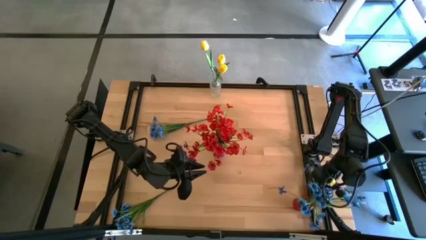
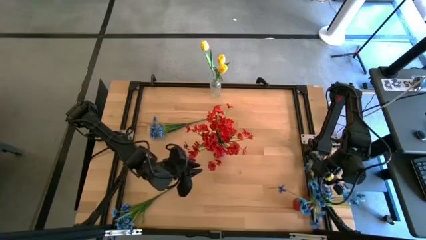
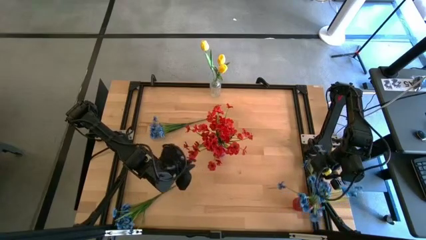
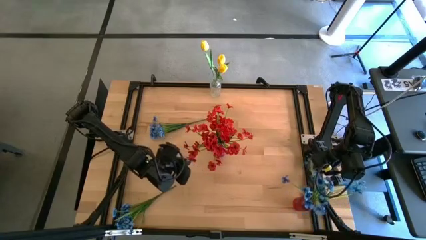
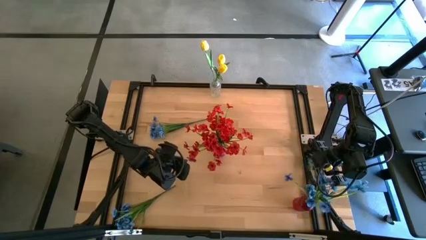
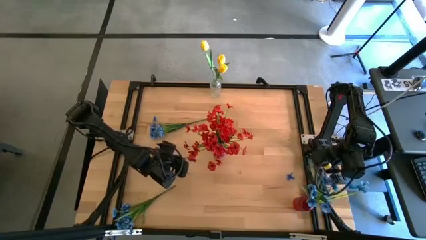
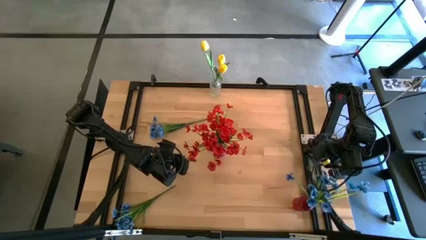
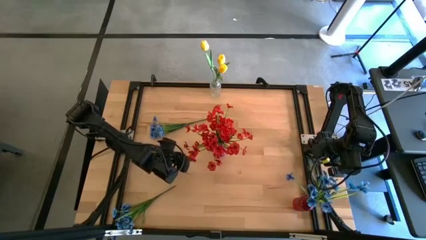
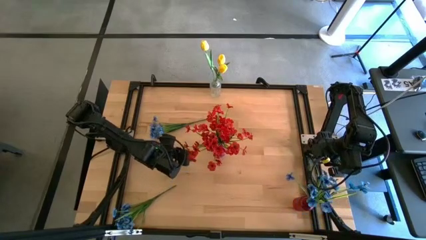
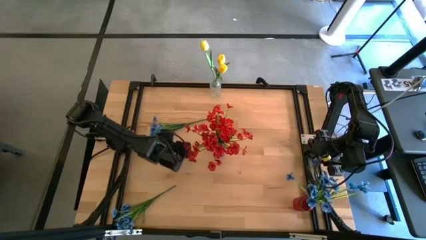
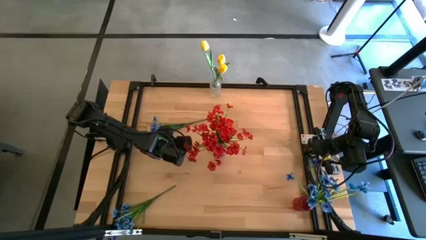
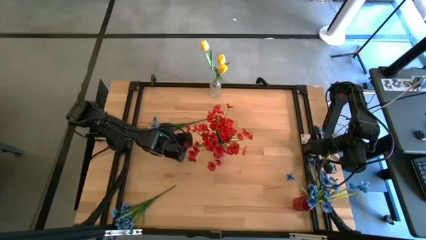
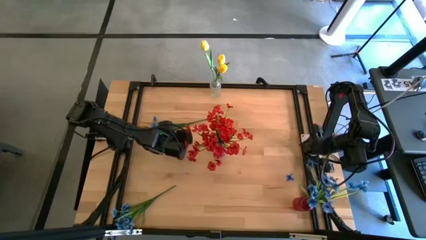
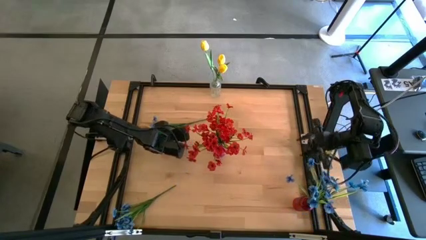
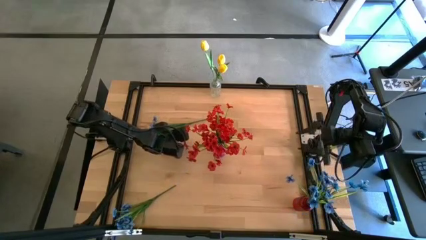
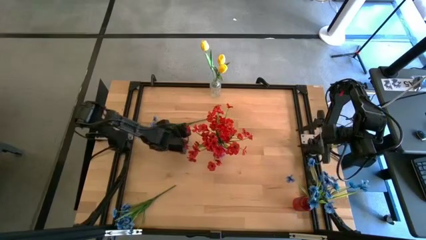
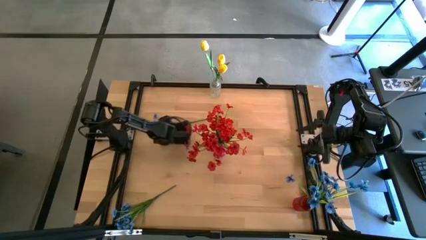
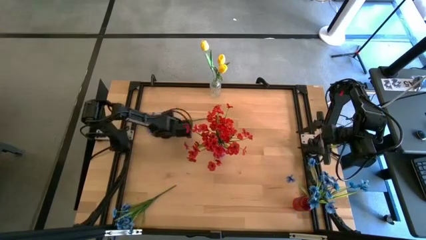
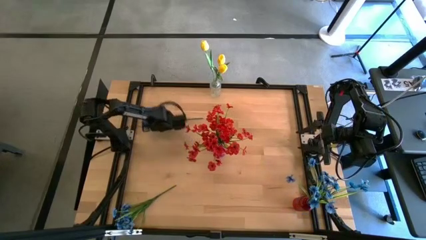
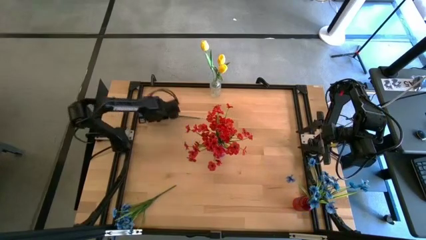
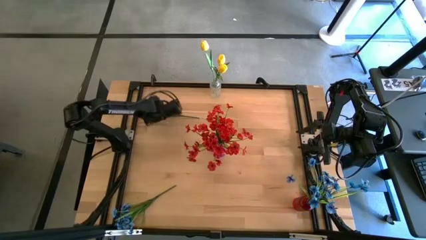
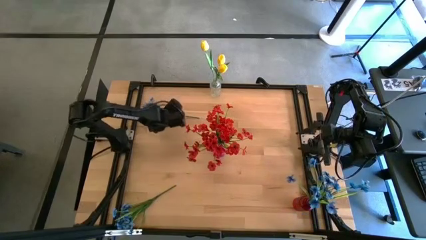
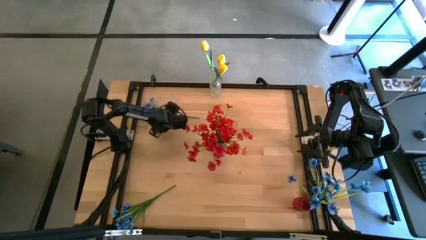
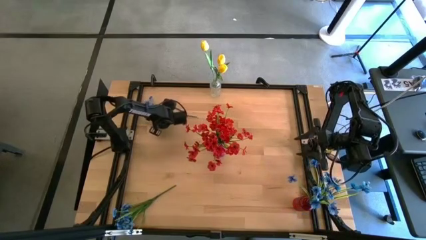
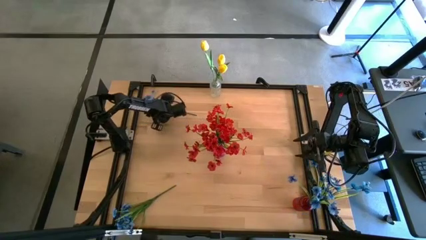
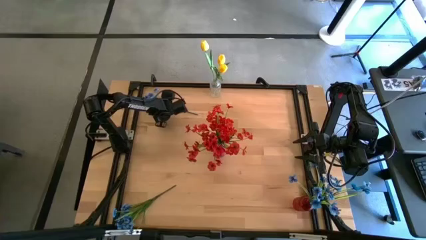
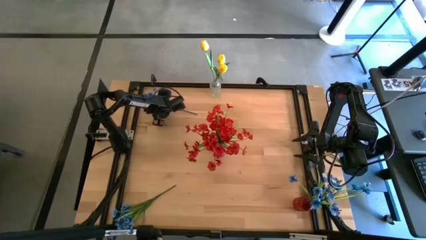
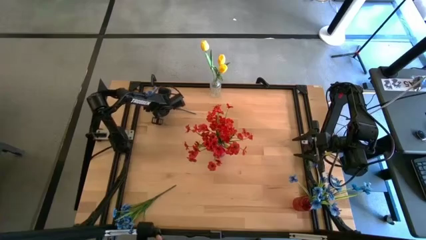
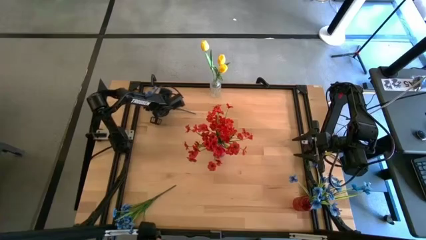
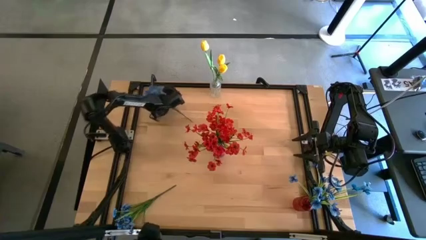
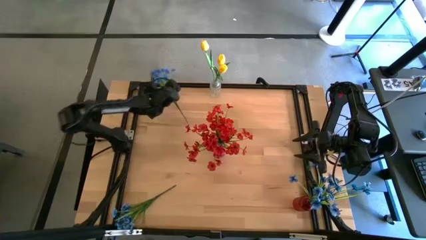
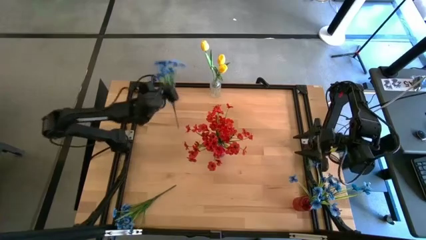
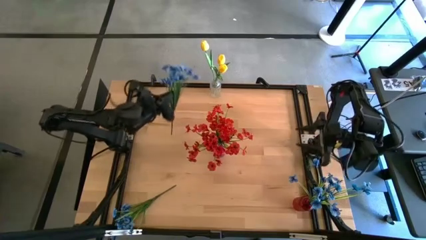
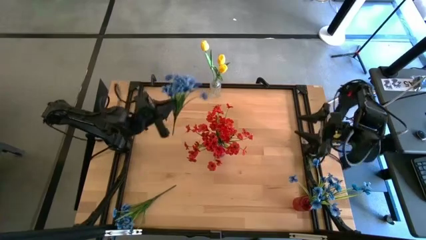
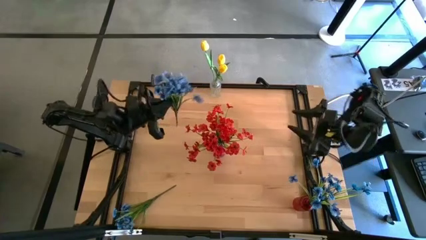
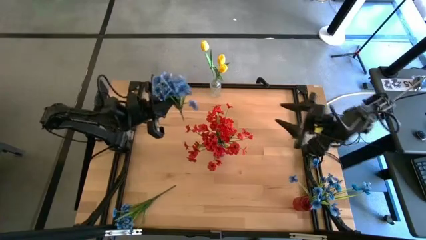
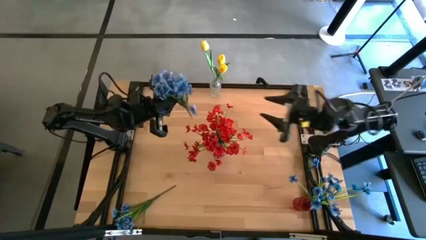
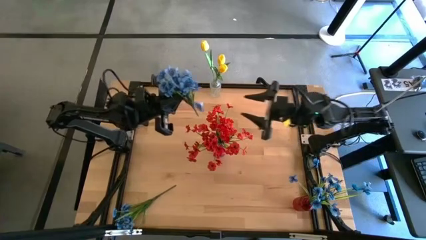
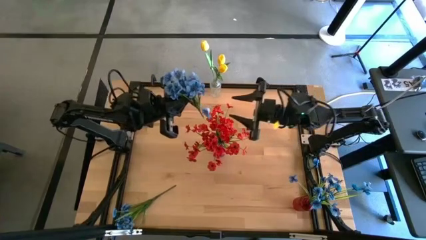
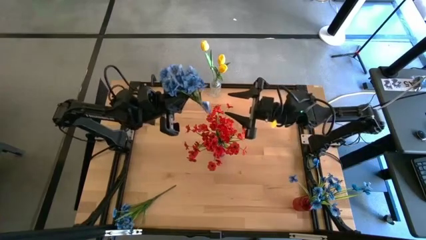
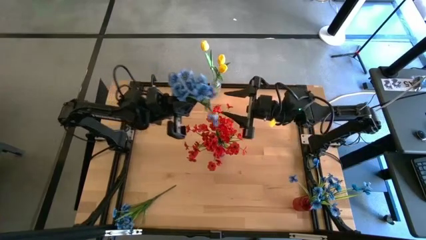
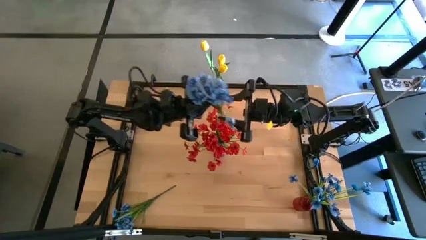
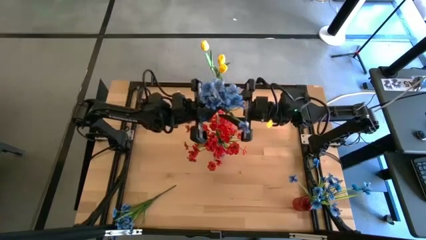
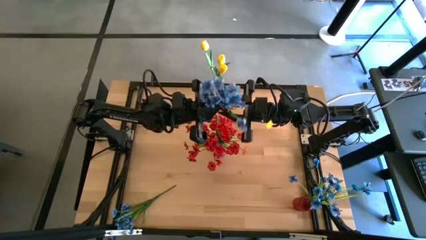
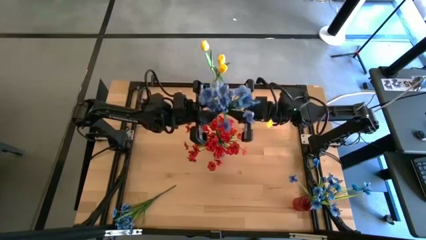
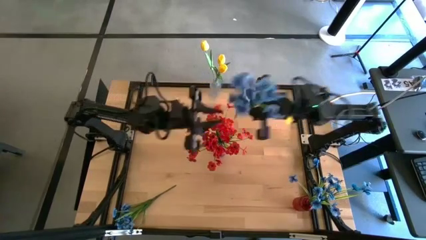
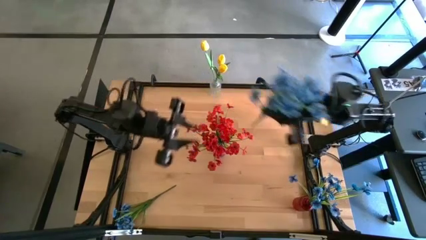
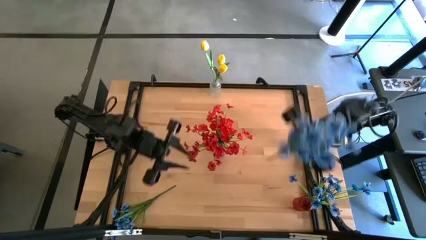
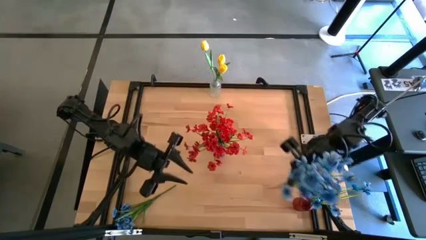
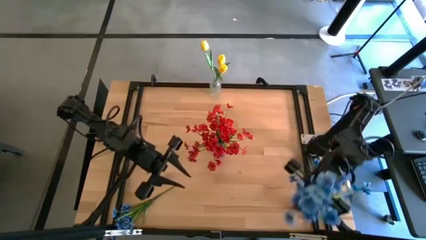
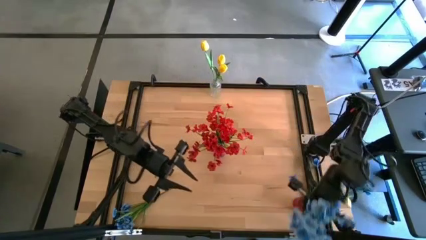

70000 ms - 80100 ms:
Task: Sort flowers into vase by color
Put the top blue flowers into the red vase

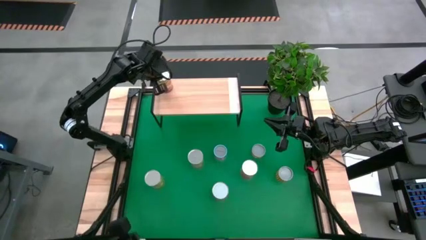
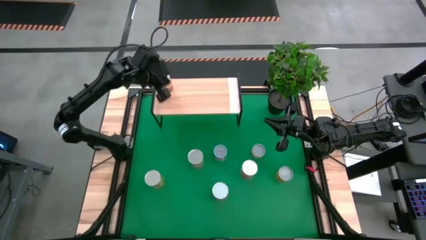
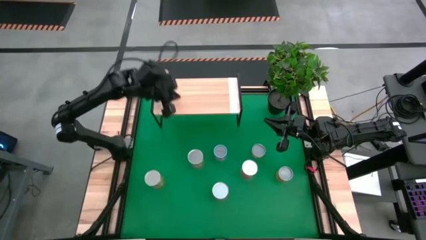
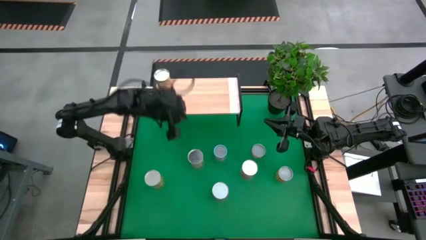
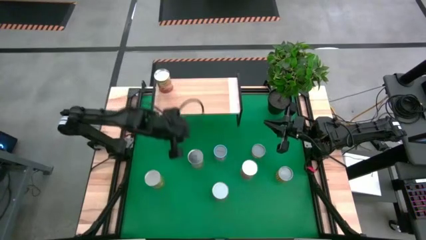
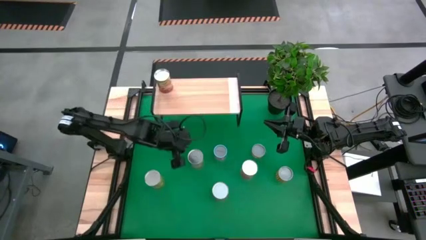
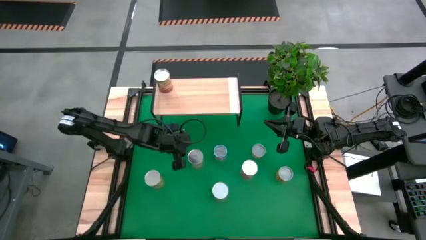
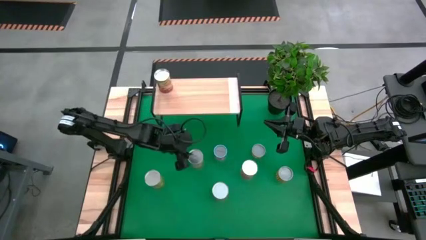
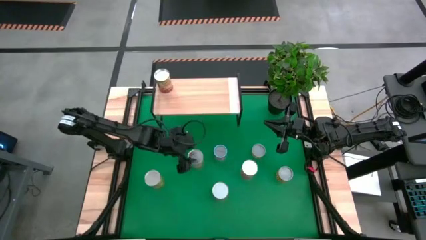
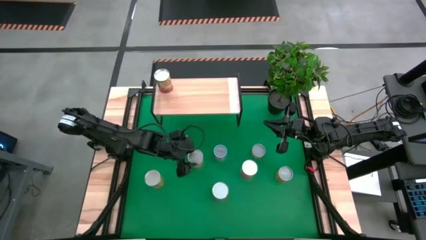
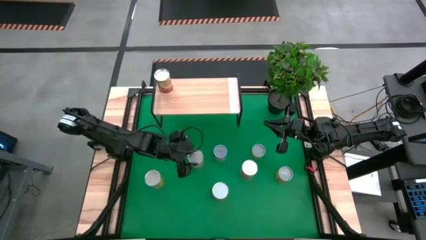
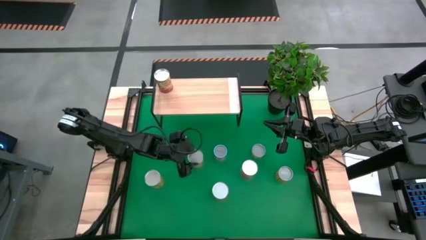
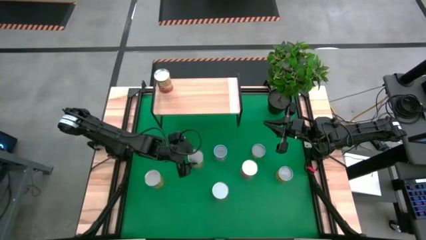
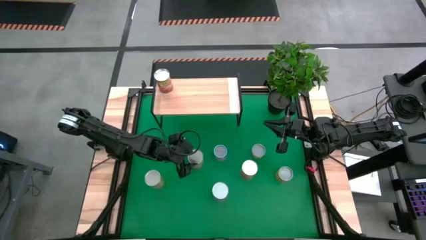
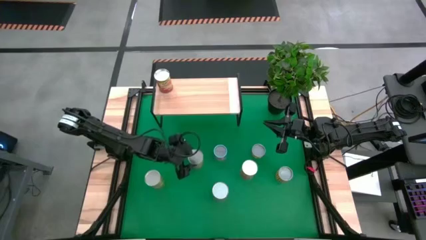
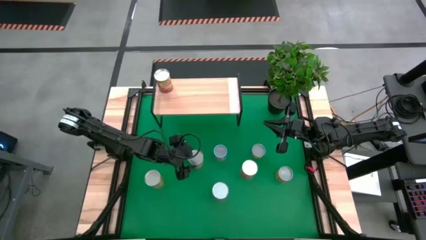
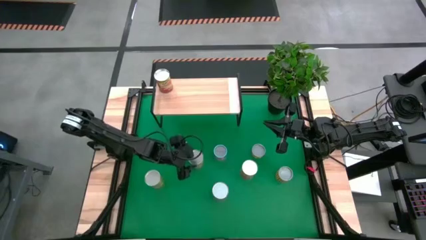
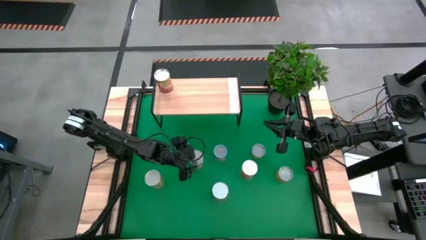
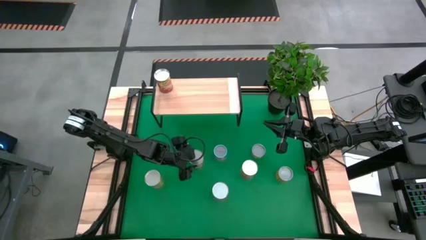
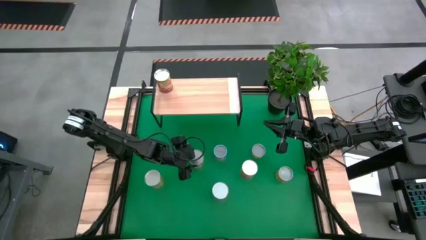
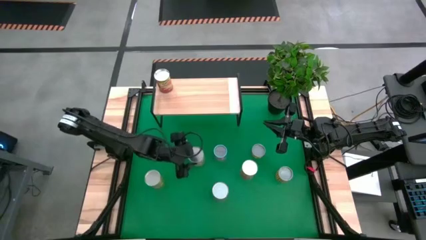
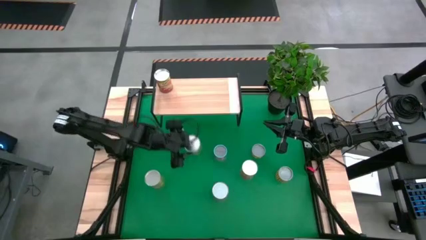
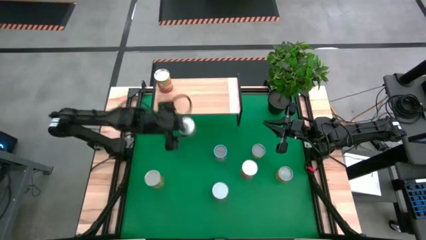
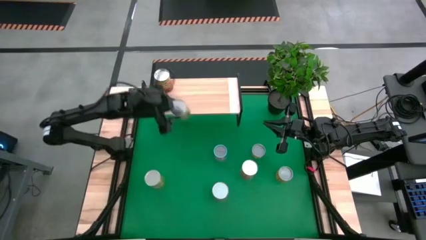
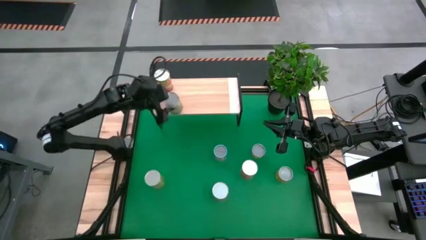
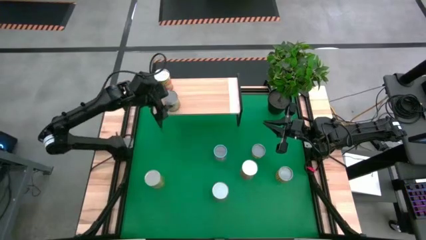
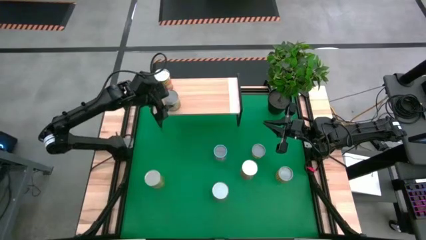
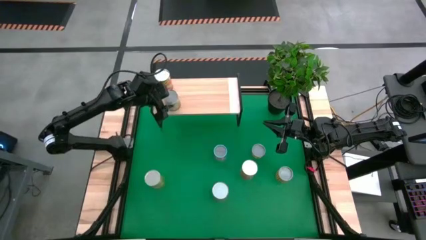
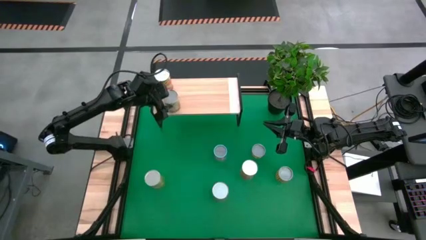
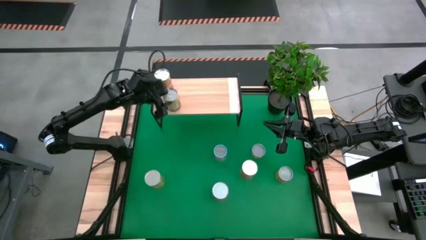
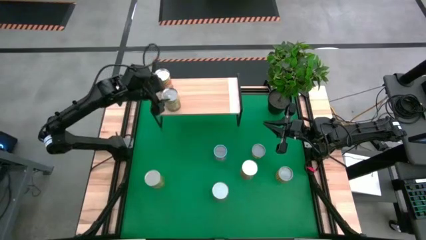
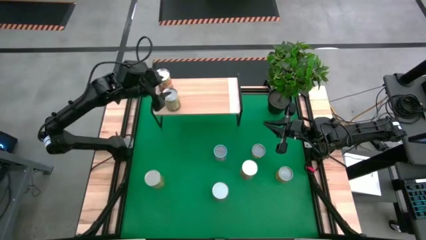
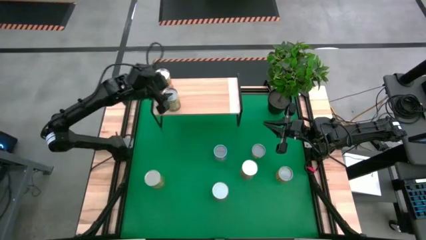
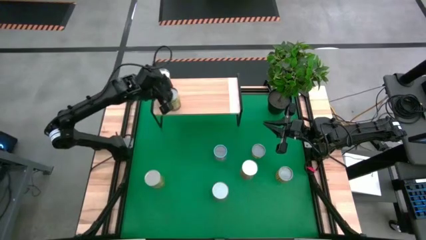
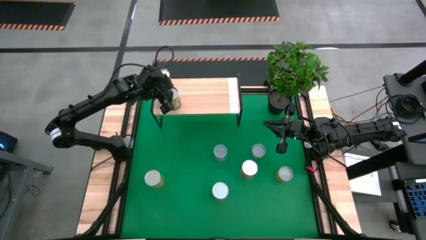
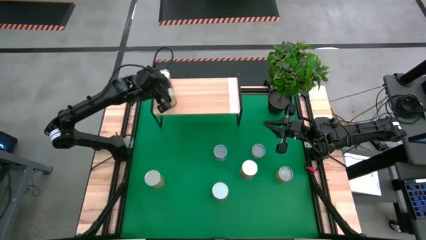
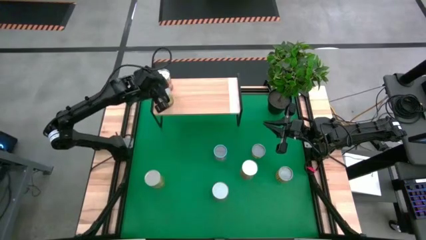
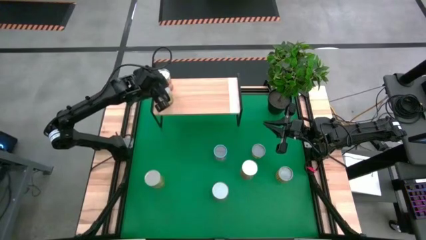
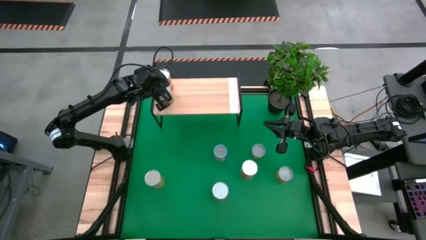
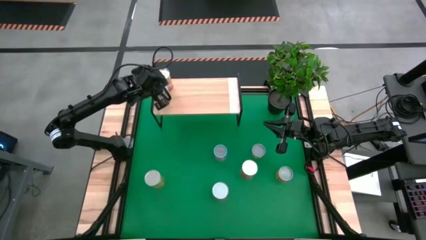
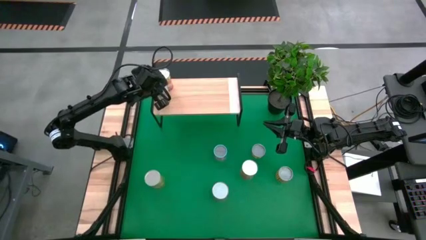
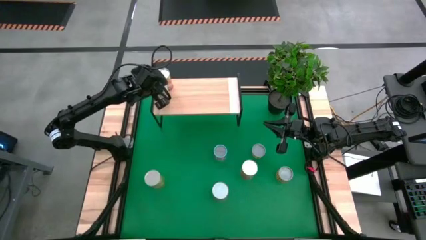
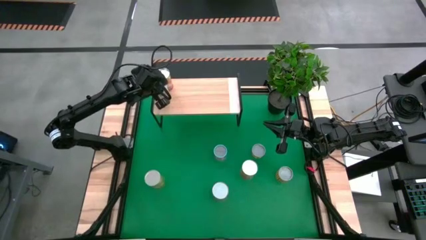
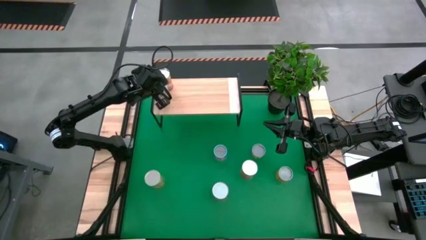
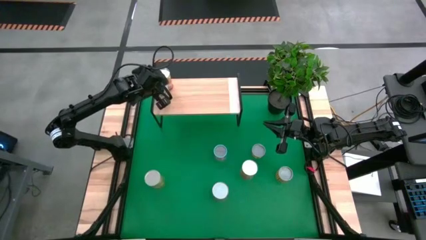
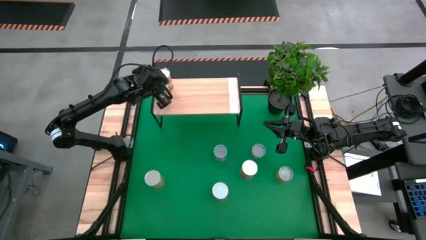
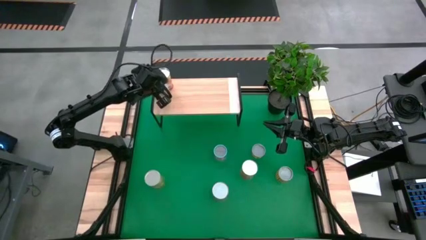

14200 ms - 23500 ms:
Task: Pick and place cans onto a shelf
Put the orange can on the shelf
